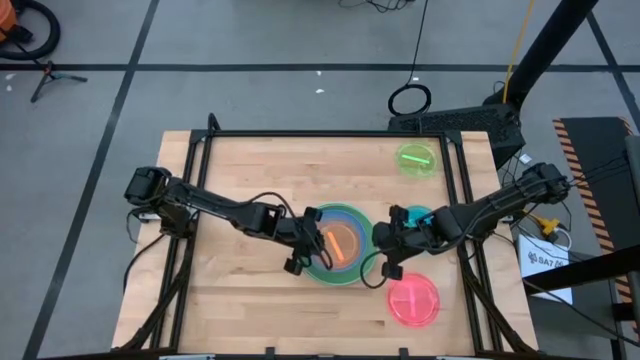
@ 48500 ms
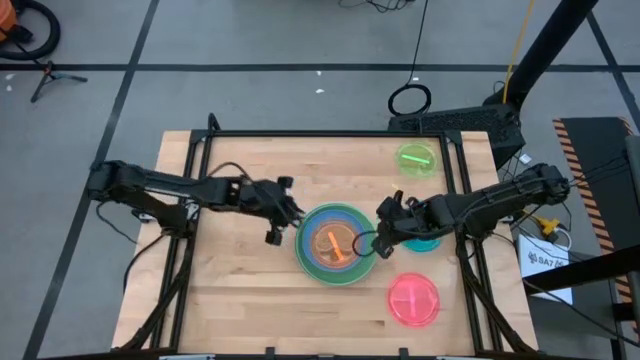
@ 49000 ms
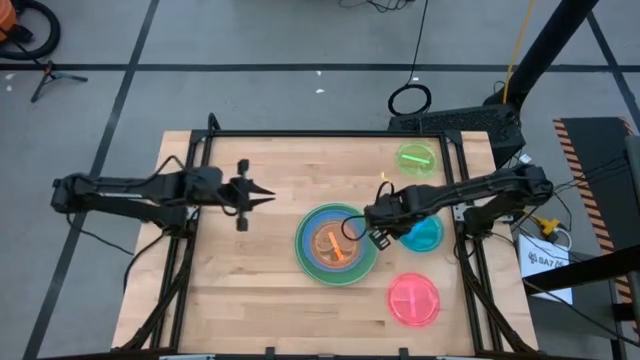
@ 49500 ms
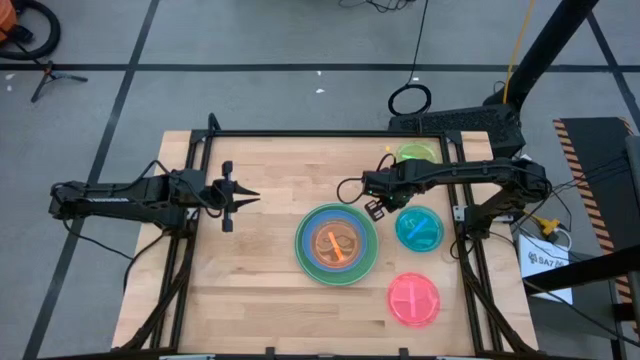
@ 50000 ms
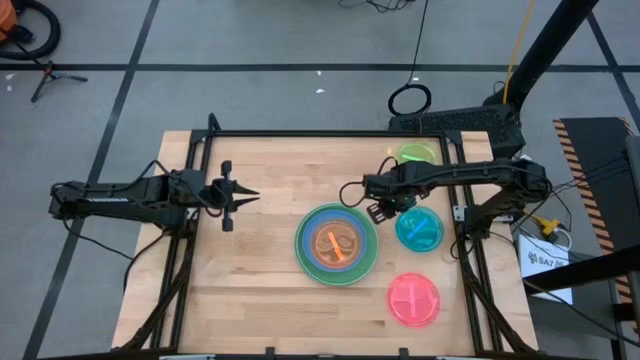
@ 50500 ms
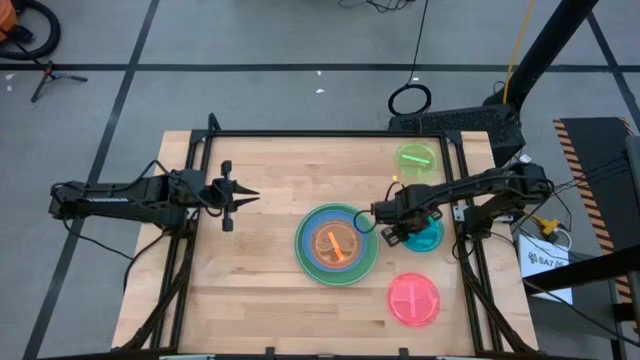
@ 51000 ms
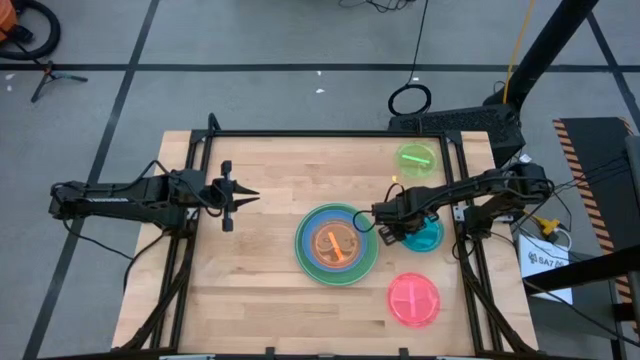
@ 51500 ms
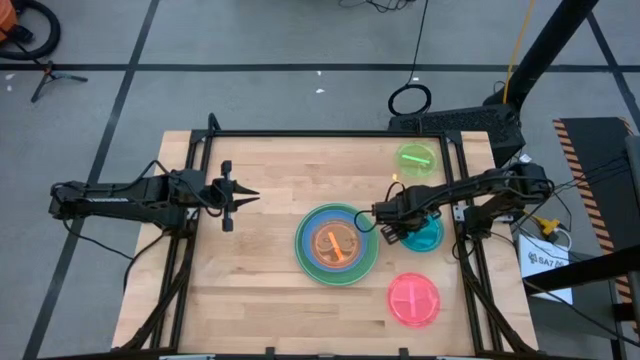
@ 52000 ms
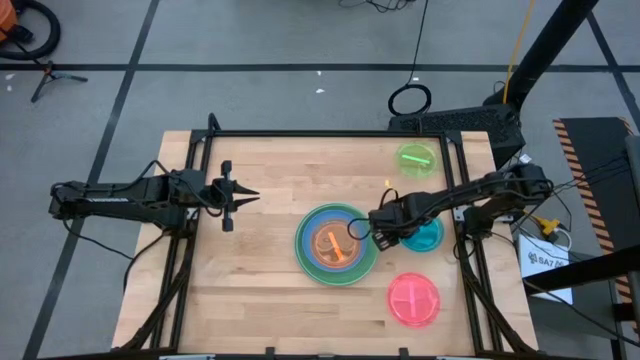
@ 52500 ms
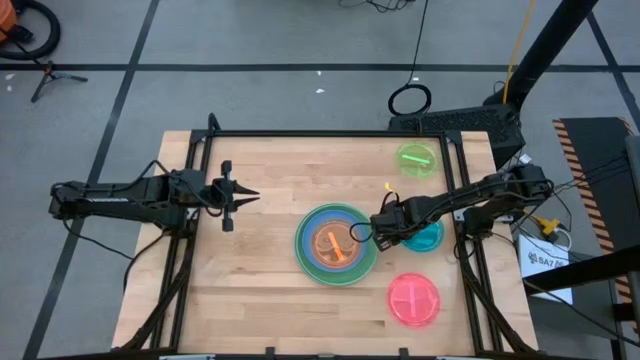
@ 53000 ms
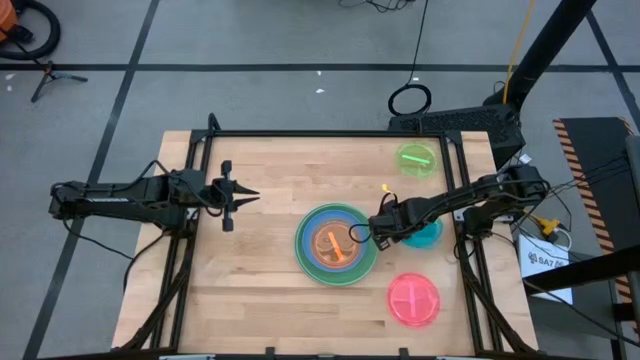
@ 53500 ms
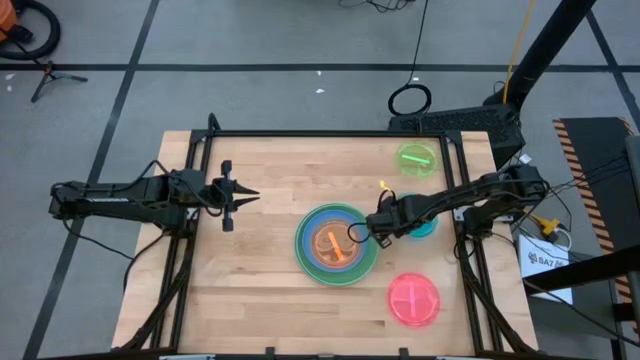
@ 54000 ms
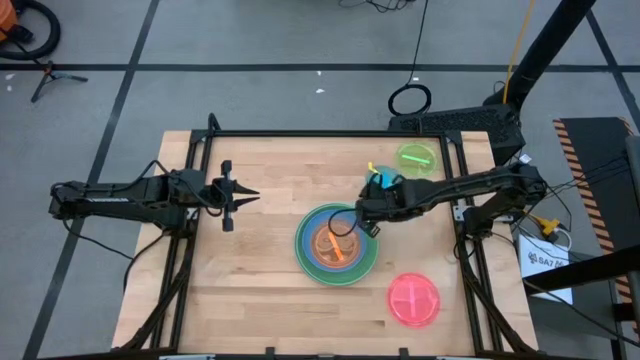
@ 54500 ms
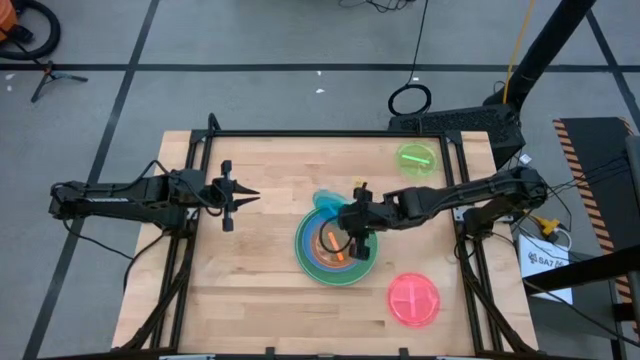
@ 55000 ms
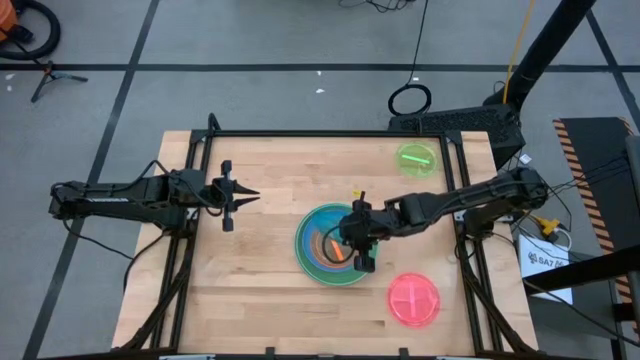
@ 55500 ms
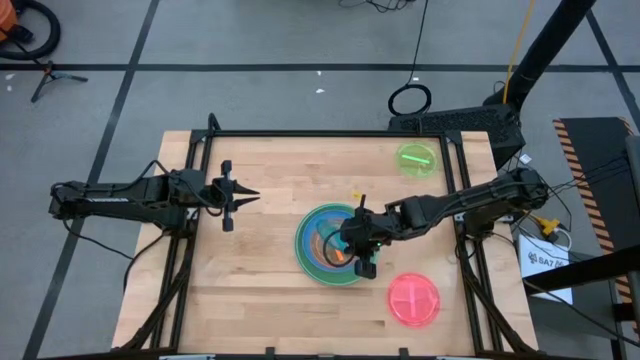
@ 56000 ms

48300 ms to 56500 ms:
Task: Stack plastic plates
Stack the blue plate on top of the orange plate

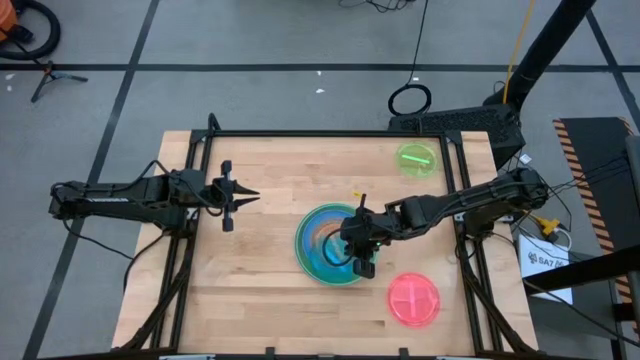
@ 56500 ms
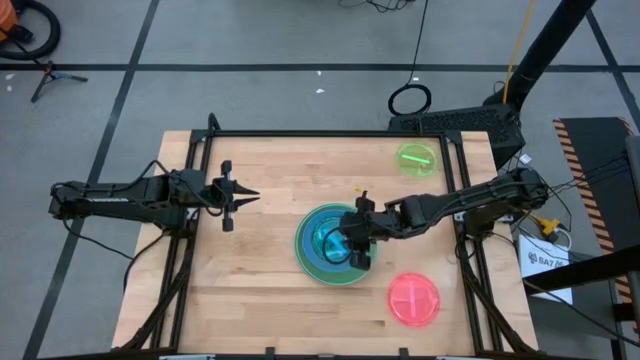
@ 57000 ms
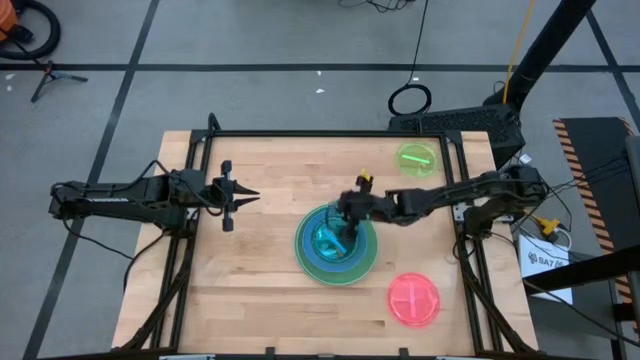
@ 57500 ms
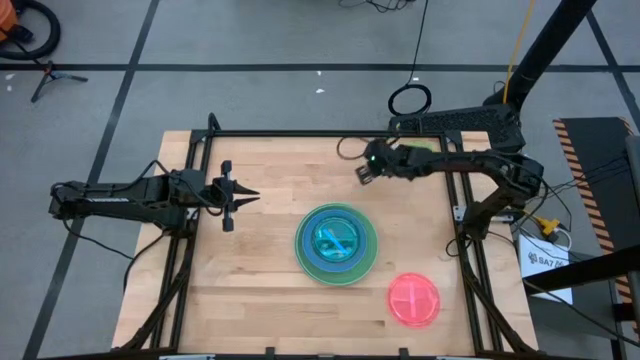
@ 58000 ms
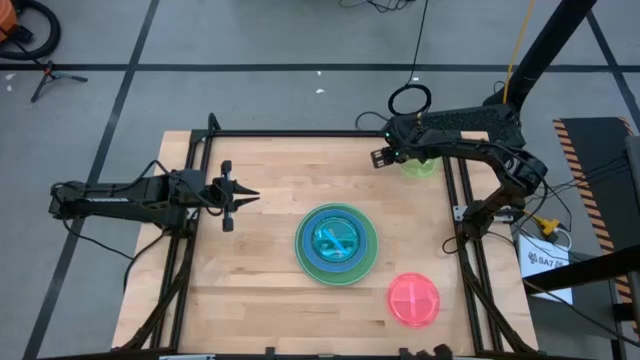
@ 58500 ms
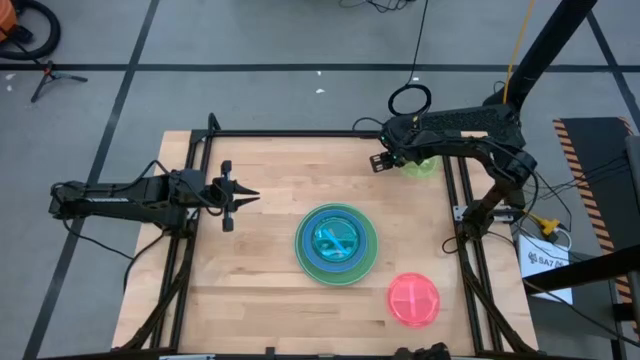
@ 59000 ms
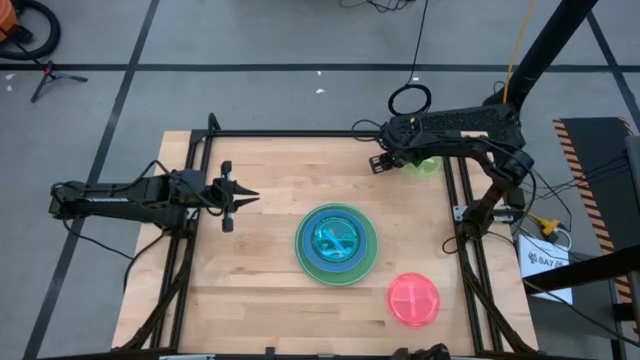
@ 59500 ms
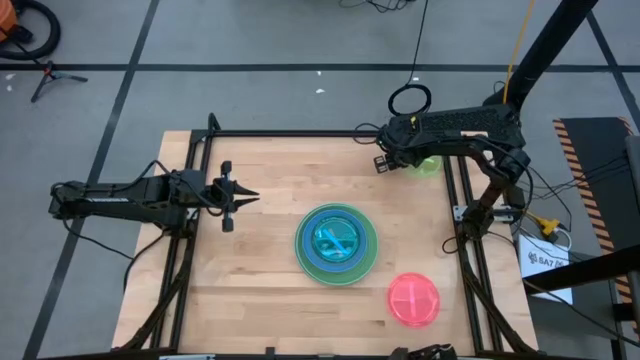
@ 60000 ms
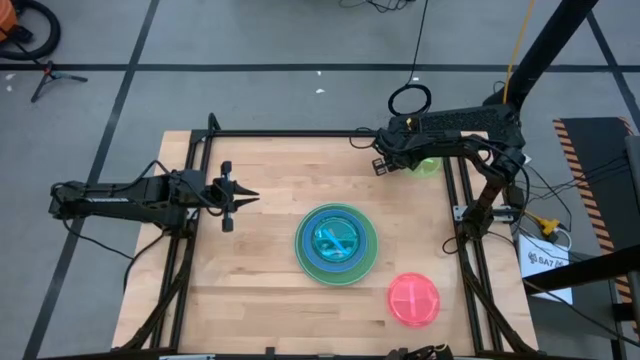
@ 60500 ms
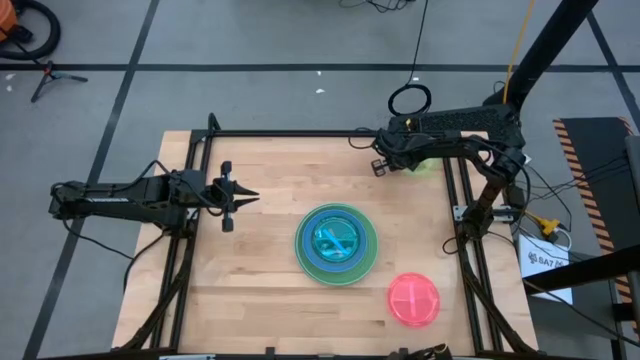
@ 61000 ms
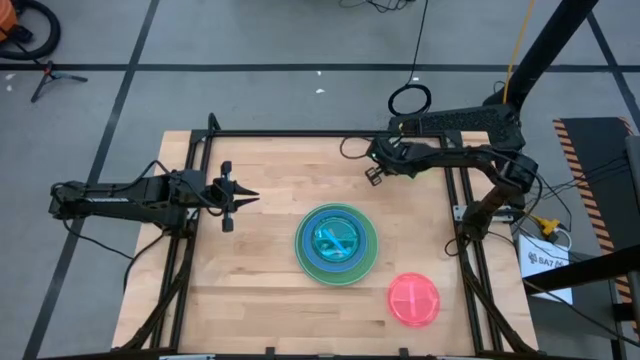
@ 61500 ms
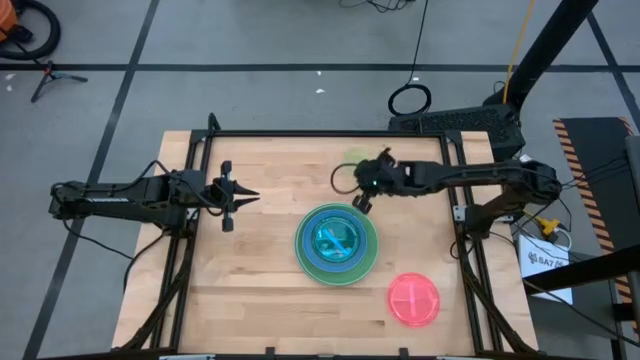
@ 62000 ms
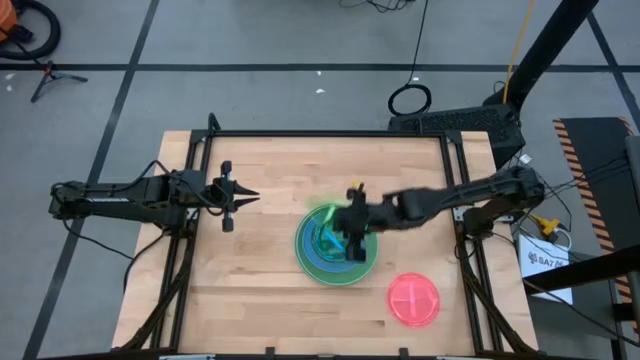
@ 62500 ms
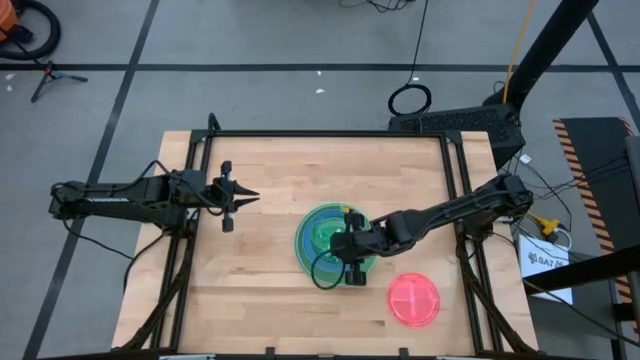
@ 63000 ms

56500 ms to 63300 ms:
Stack the light green plate on top of the blue plate

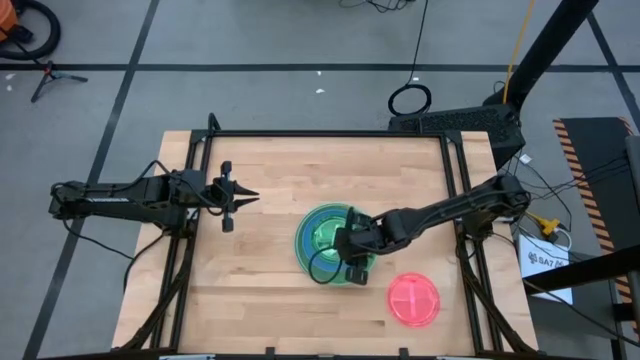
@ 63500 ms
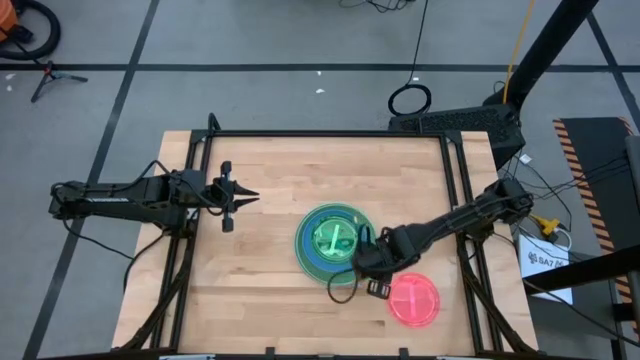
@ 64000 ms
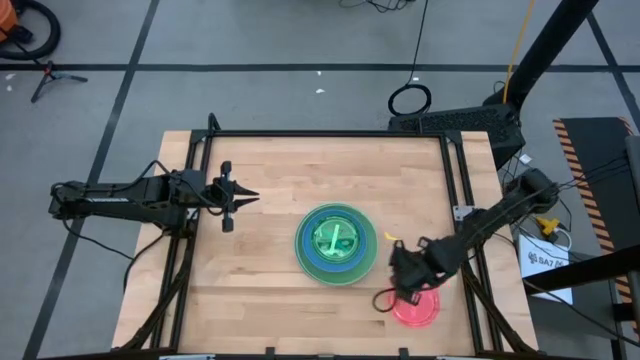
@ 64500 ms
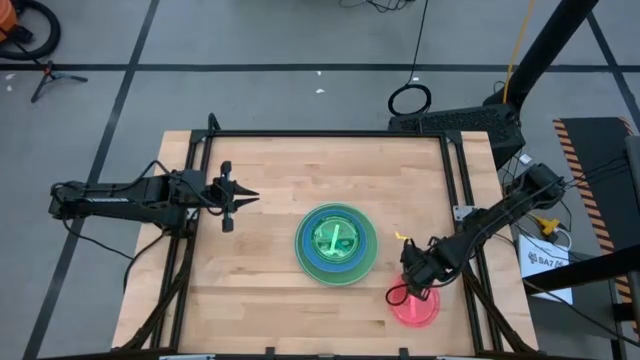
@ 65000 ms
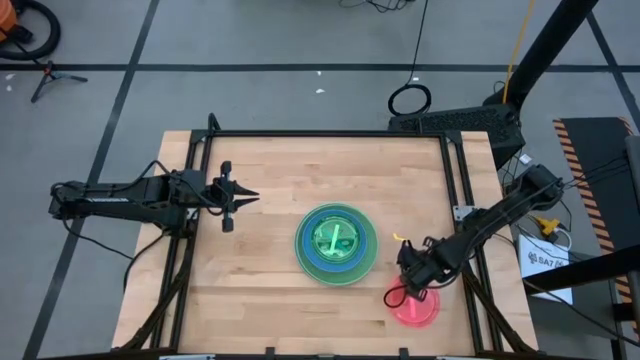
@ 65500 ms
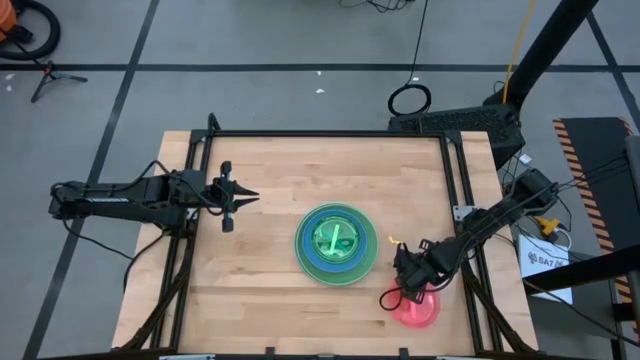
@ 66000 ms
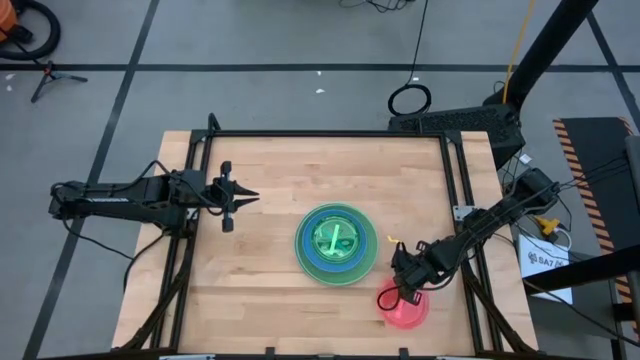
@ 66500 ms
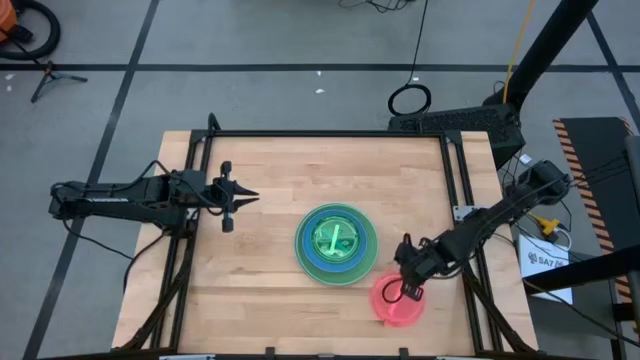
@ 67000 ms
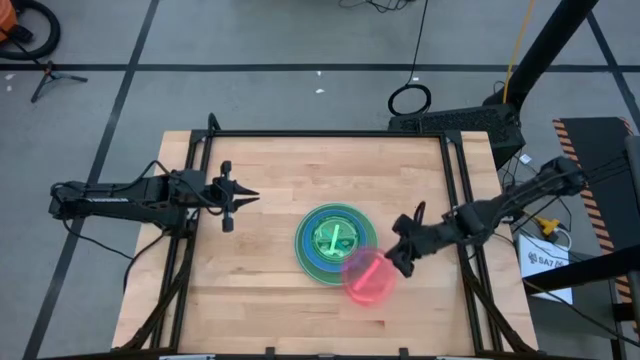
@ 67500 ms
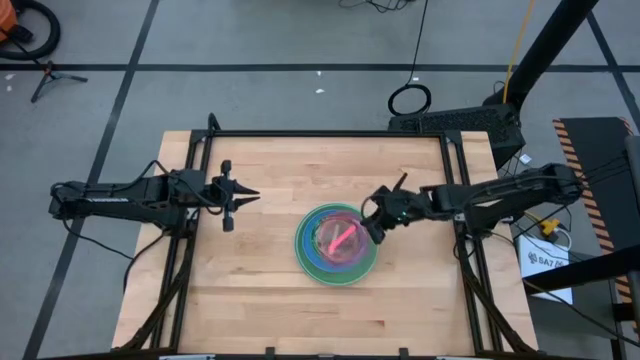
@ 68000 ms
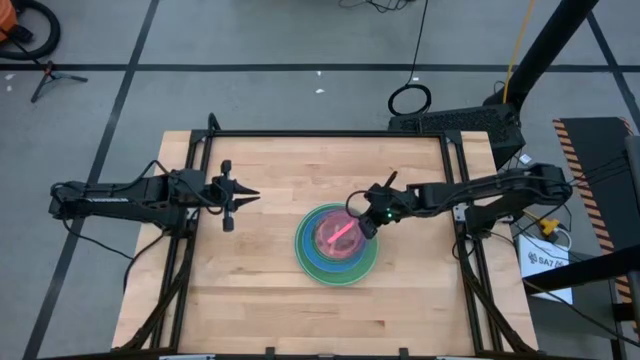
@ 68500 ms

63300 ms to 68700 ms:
Stack the pink plate on top of the light green plate

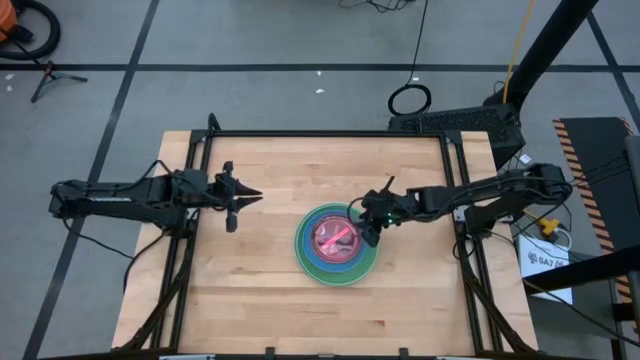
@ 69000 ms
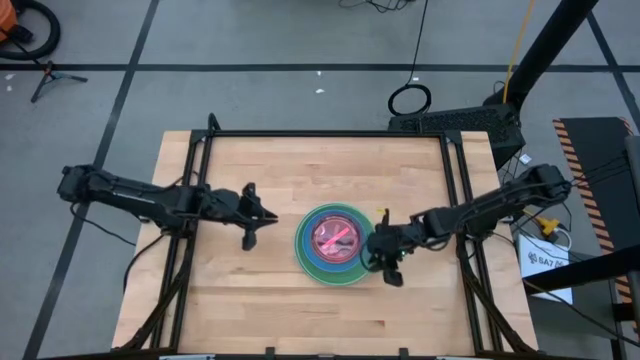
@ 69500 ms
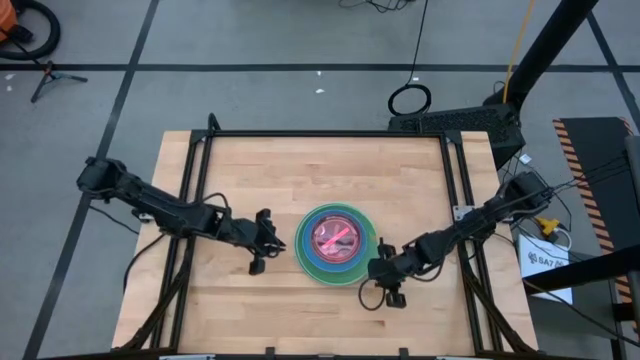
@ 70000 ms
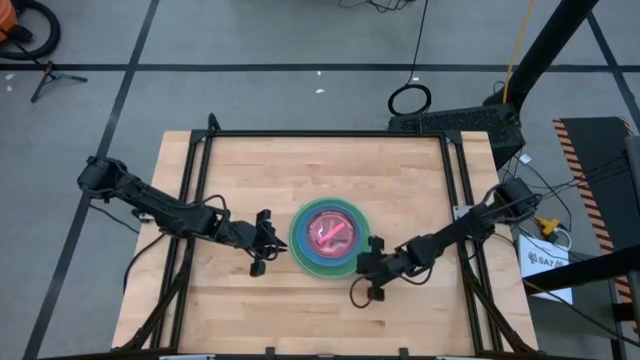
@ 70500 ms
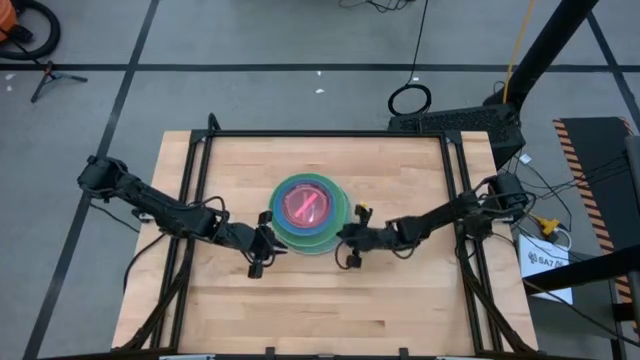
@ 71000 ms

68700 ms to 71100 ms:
Adjust the stacked different colored plates
